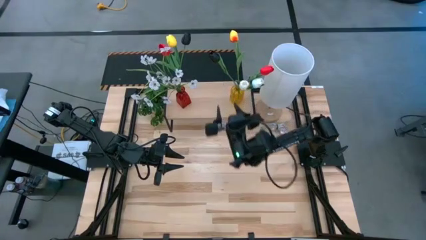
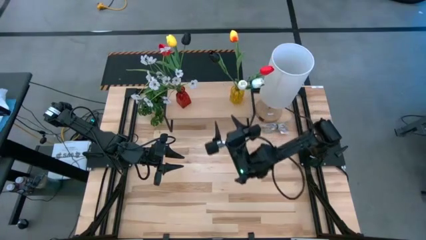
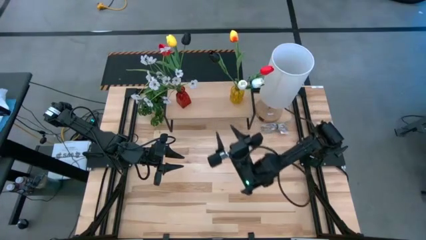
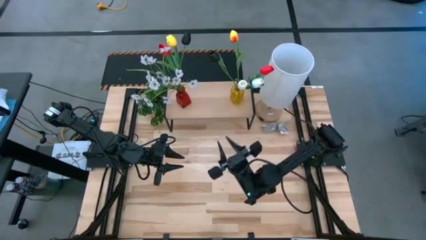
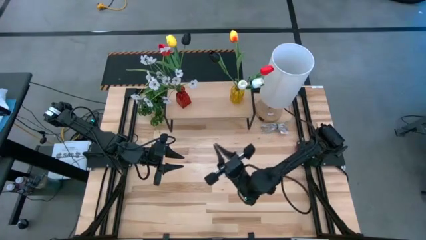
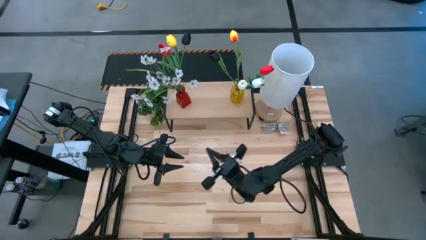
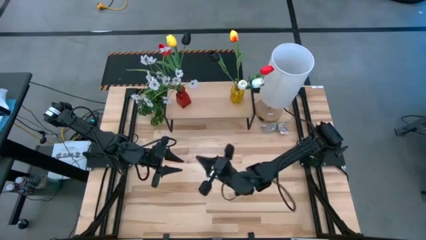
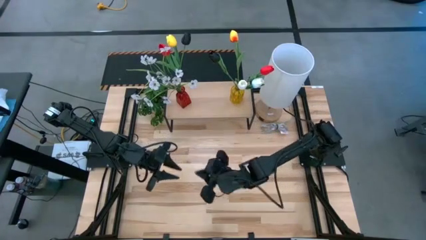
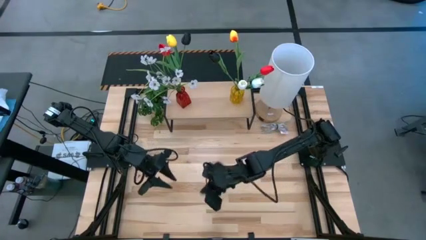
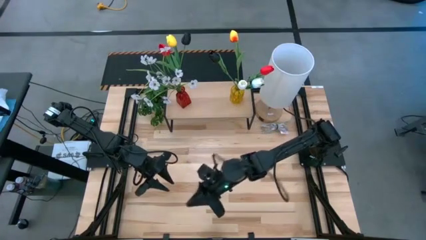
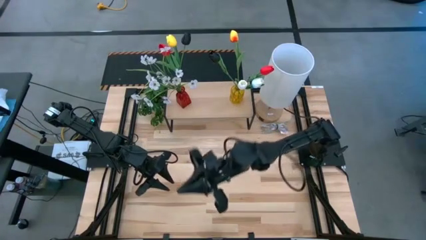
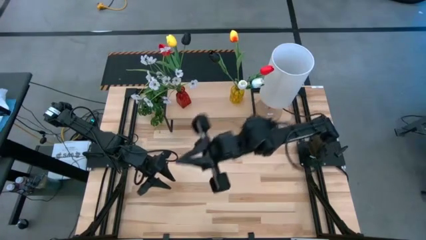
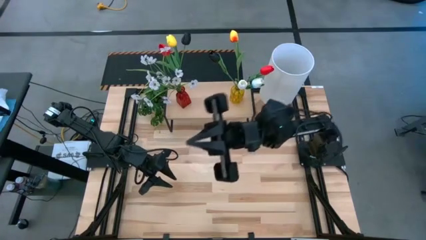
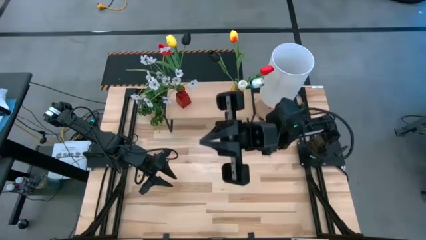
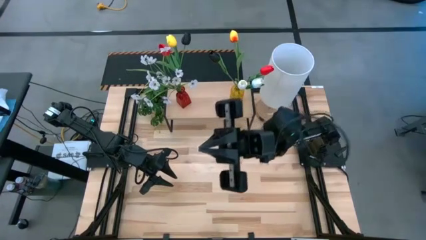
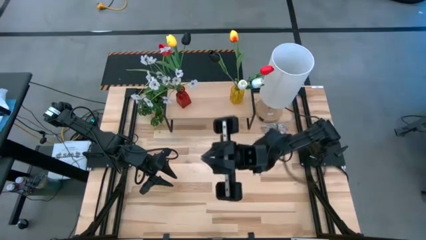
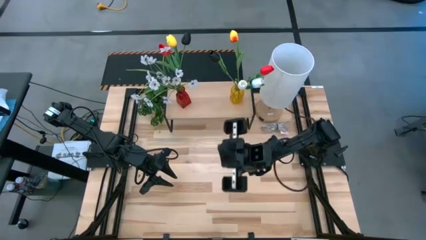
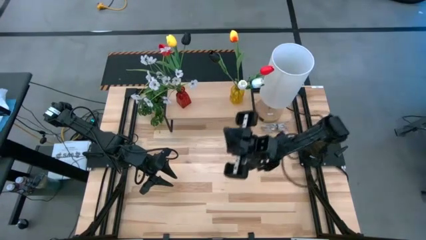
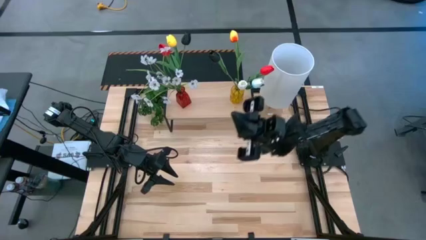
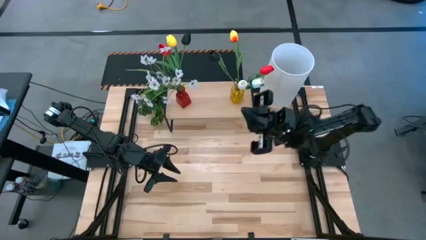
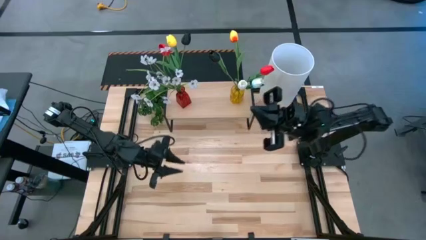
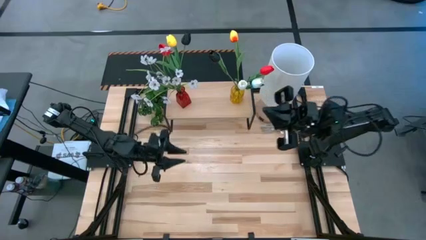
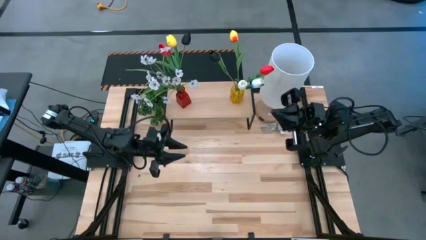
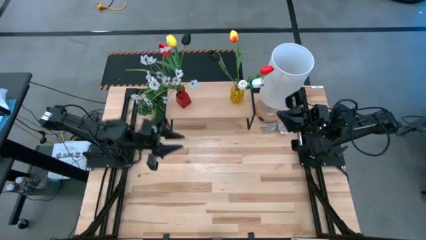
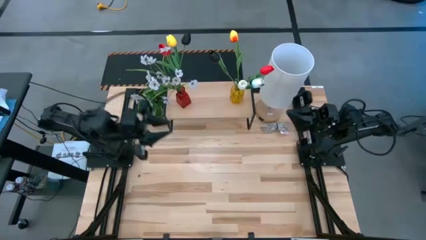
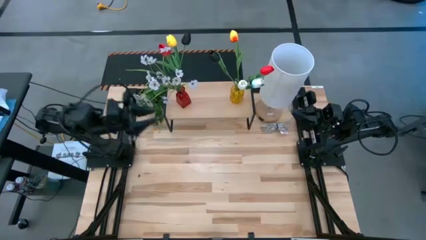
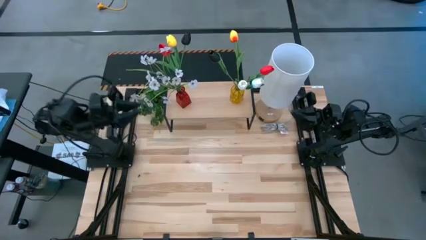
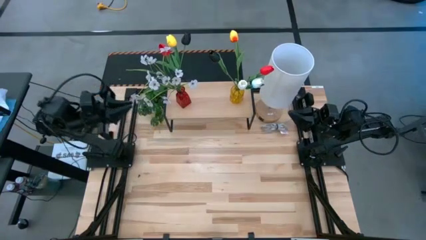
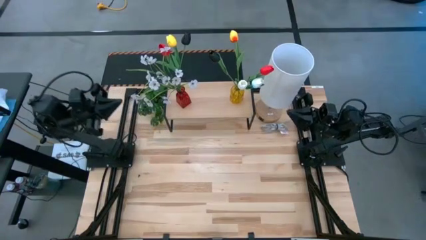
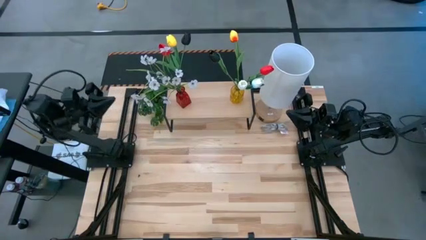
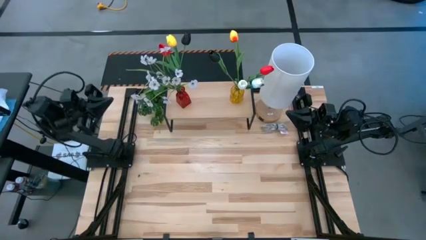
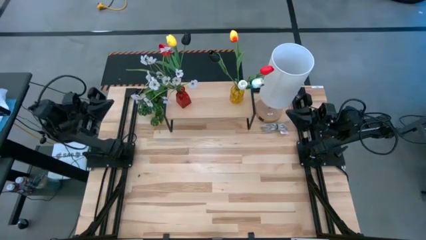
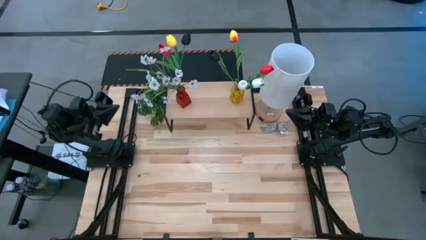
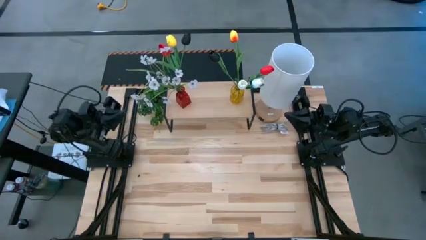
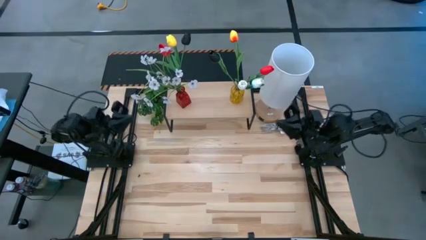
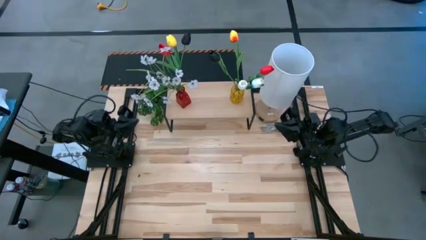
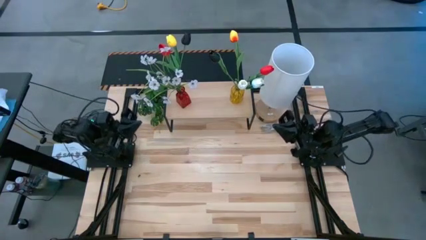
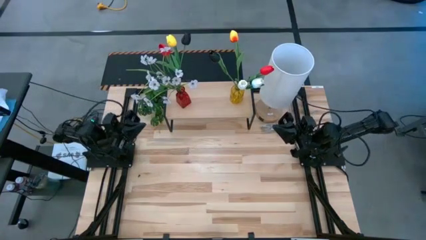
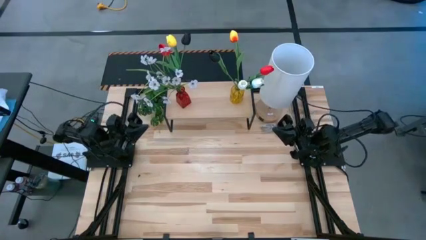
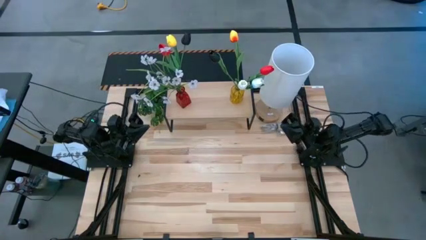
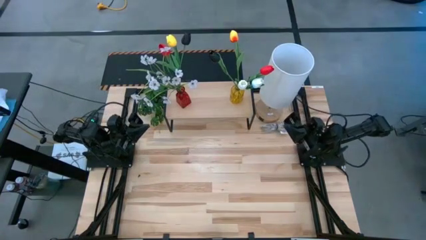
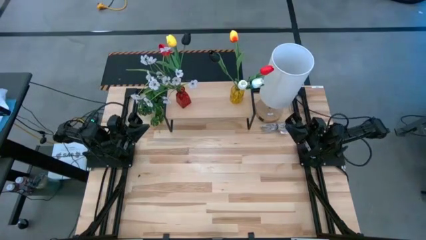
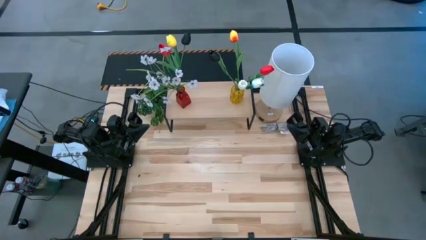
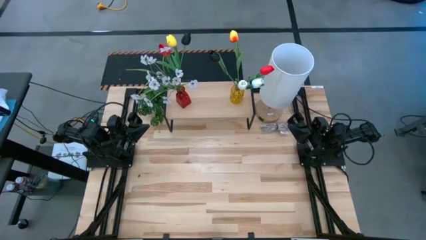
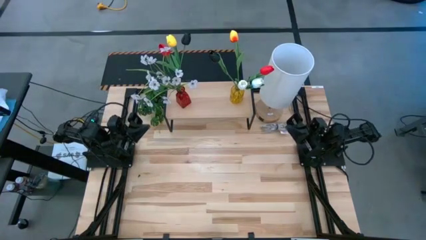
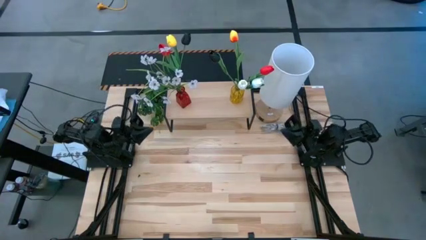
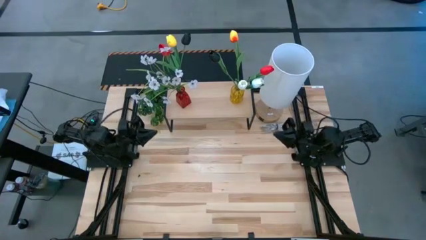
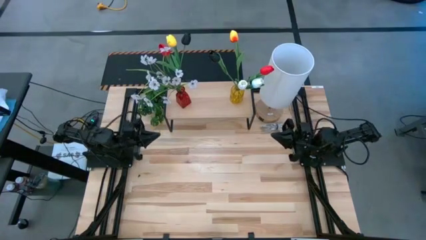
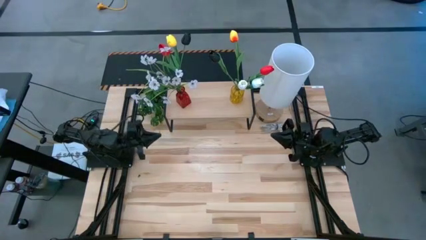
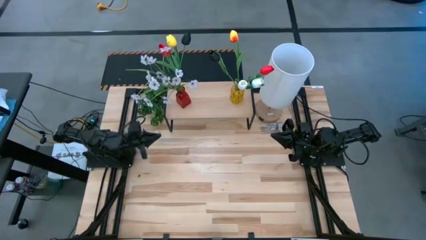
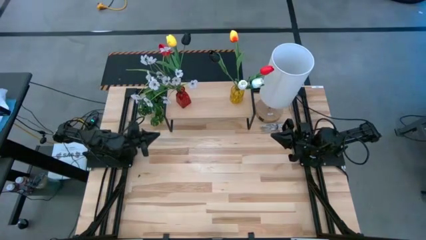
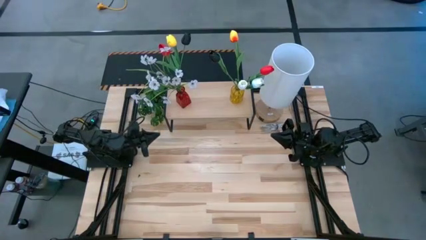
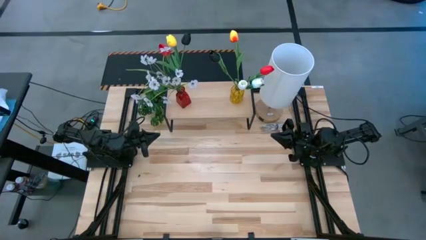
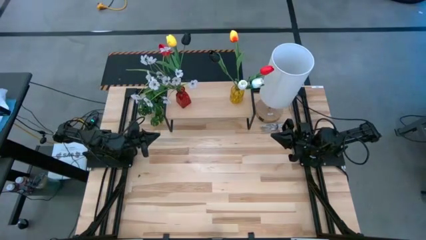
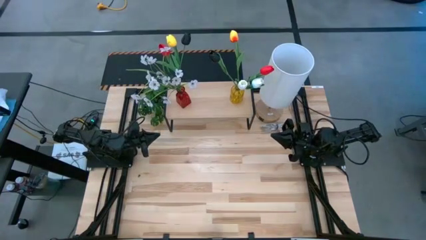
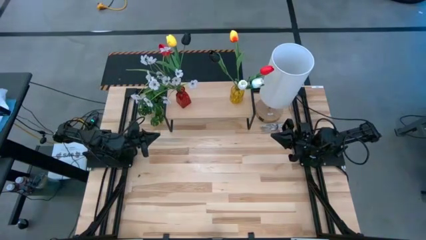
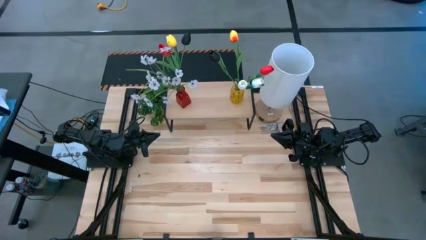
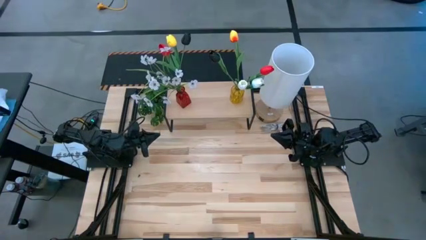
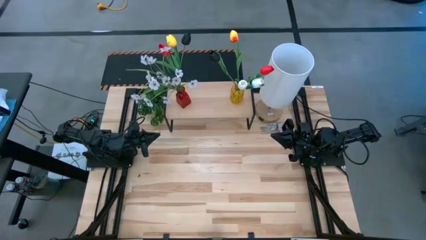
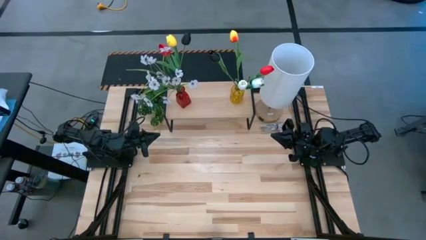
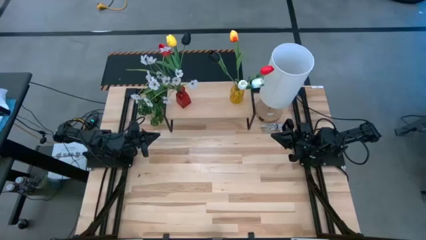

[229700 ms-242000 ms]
Task: Pick and place flowers into a vace then onto a shelf
Return to Home Position
